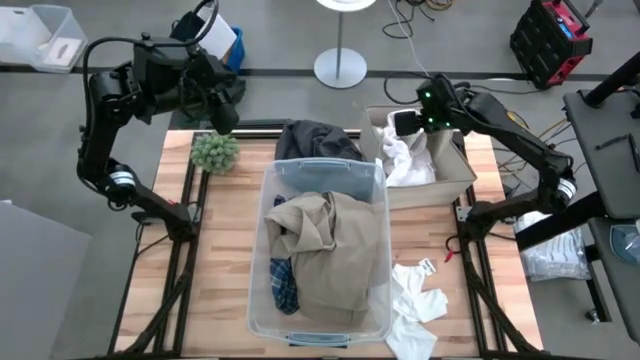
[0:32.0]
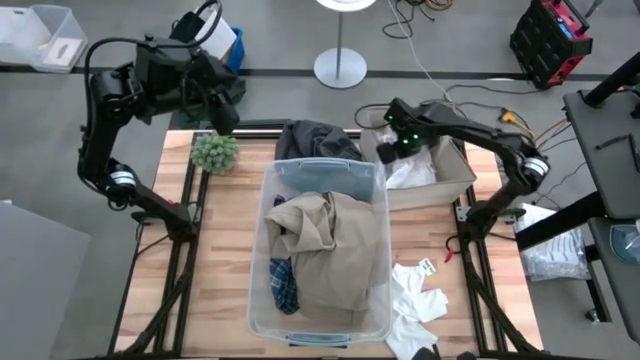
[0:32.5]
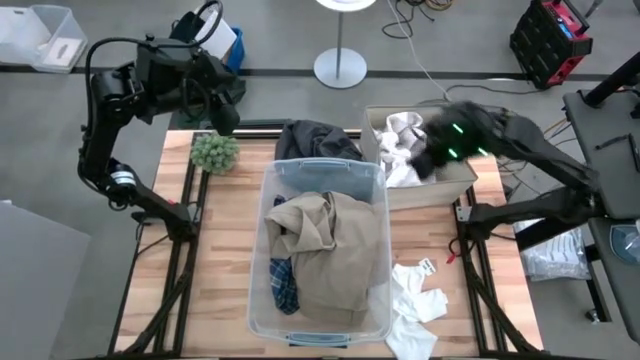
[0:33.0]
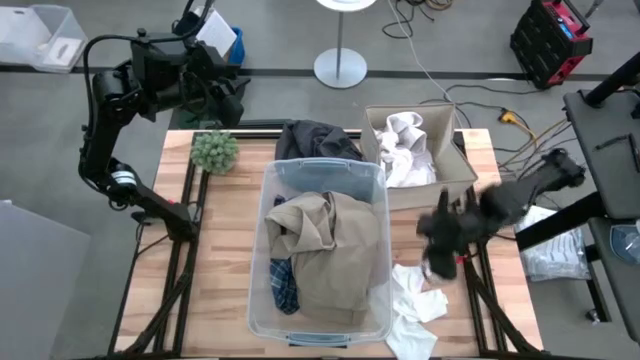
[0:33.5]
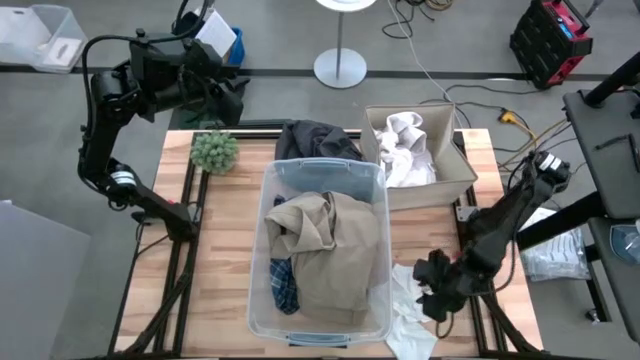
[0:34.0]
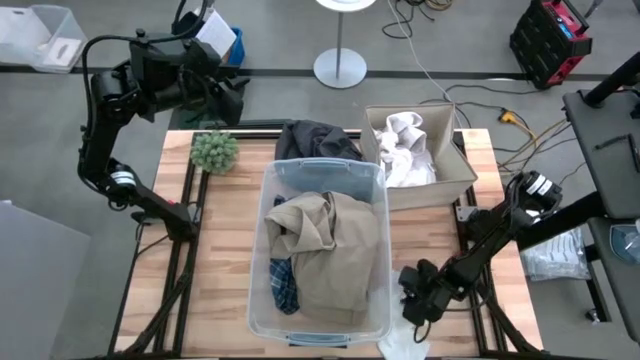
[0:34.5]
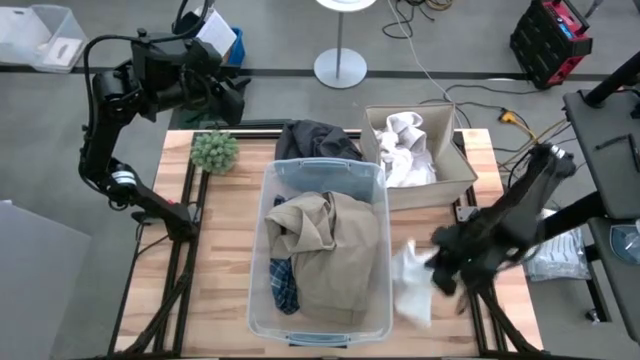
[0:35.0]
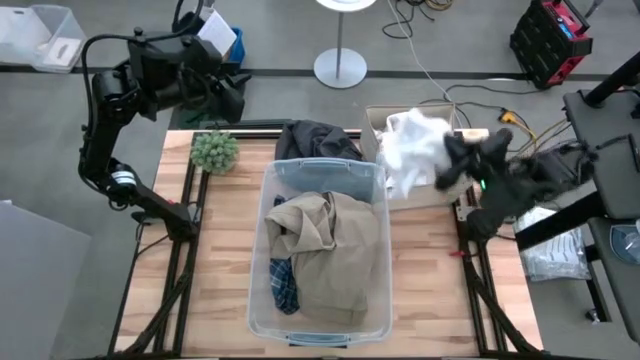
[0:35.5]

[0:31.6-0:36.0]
Task: Sort clothes
Put the white baby pajamas into the brown laundry organizer

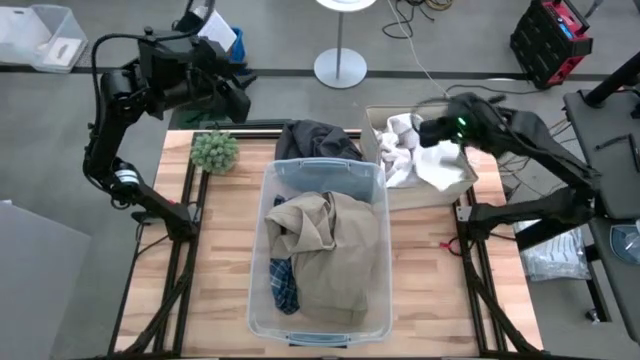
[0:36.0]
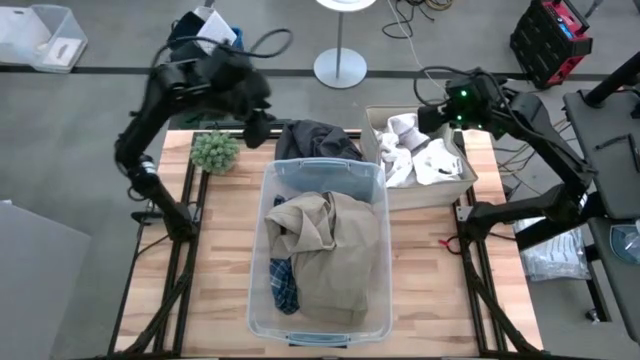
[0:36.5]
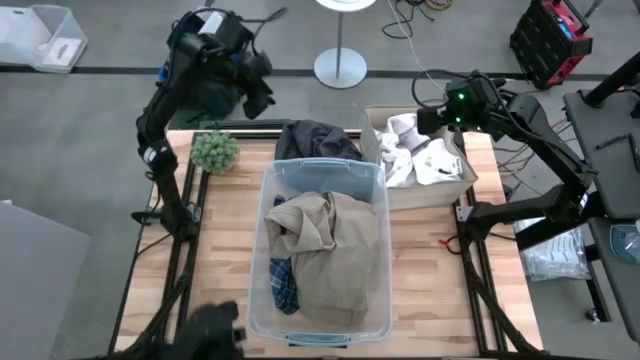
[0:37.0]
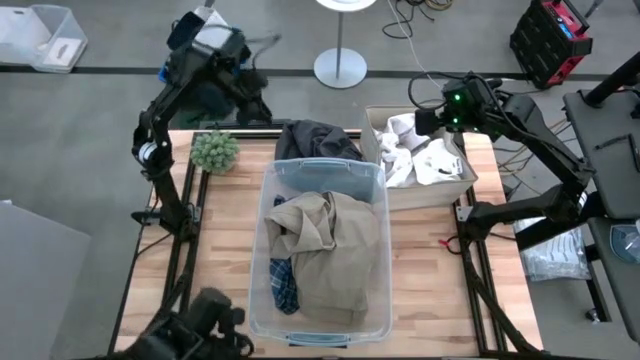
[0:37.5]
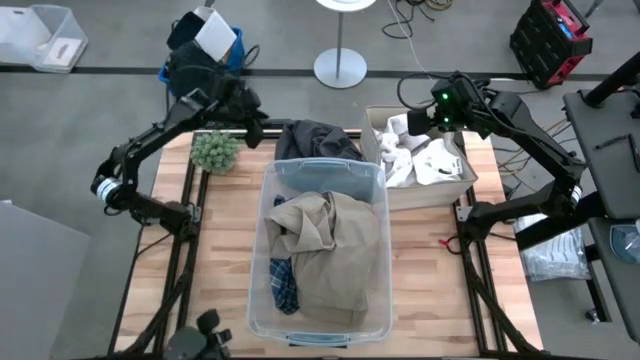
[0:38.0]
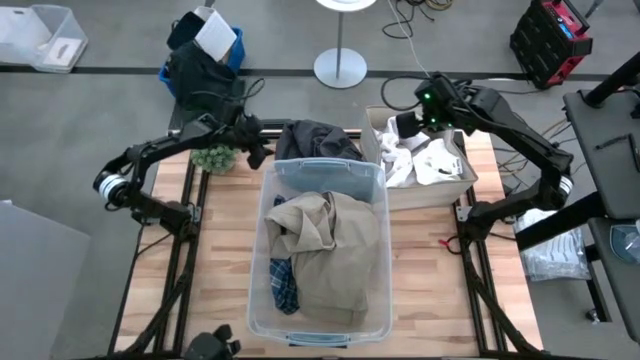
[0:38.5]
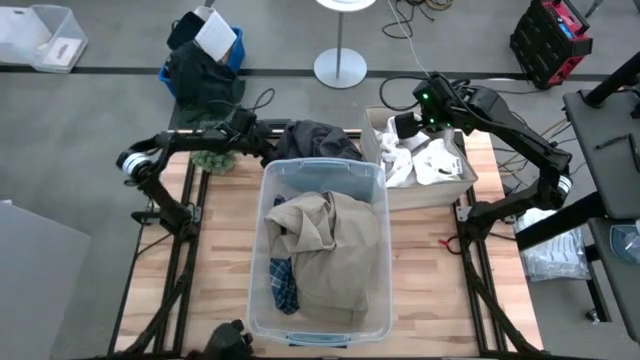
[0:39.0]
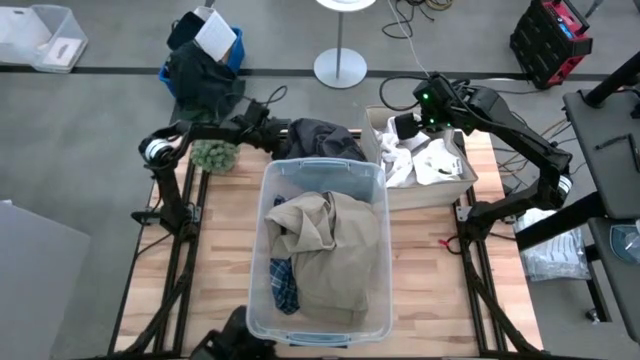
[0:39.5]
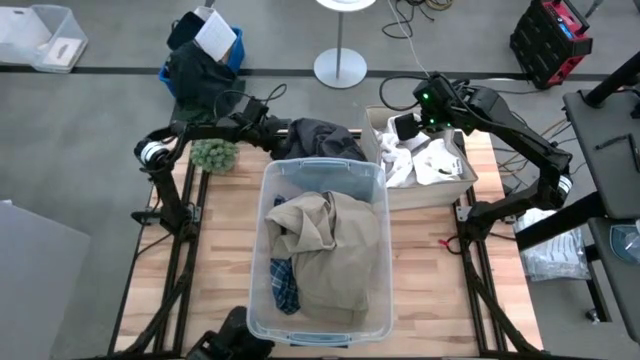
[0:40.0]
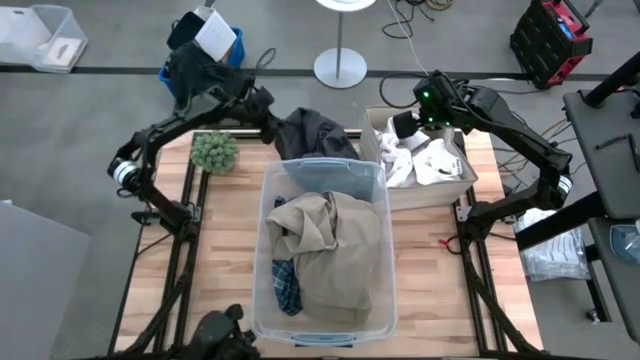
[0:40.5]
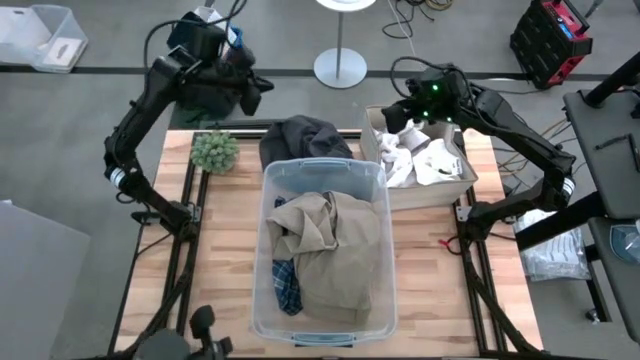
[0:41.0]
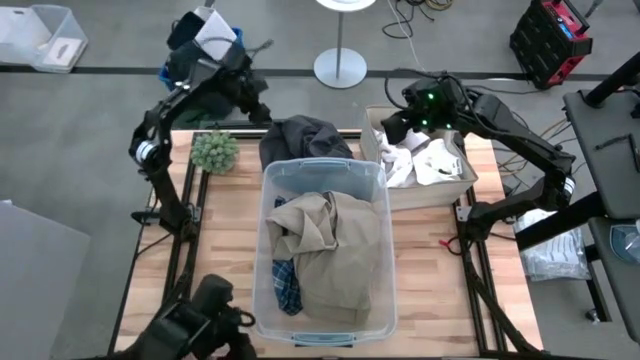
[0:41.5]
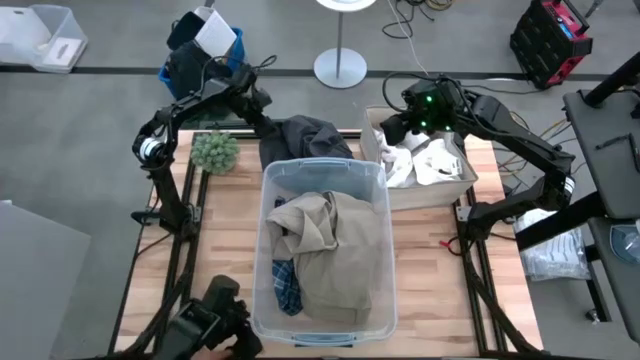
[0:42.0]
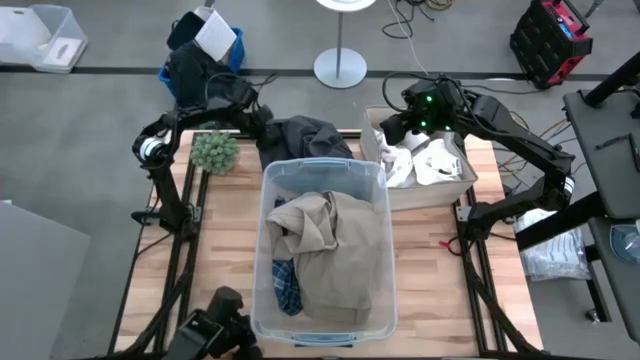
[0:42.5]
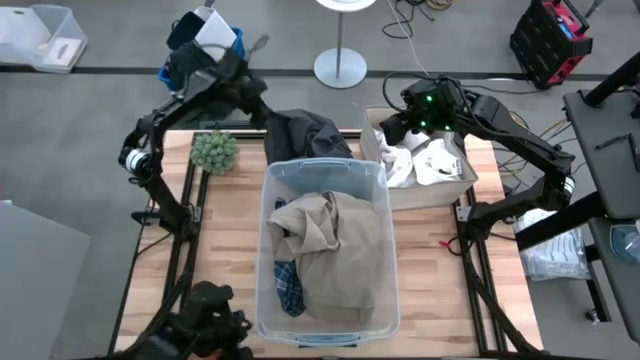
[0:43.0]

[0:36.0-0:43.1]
Put the black pants into the transparent bin

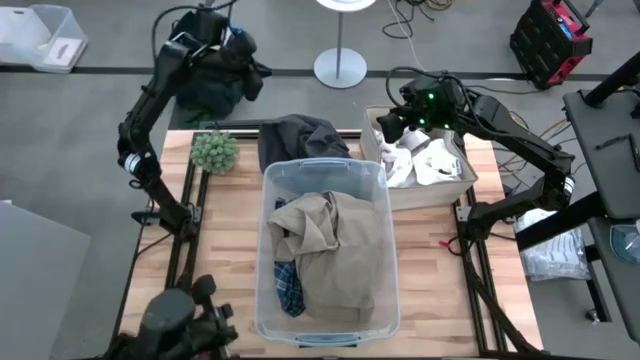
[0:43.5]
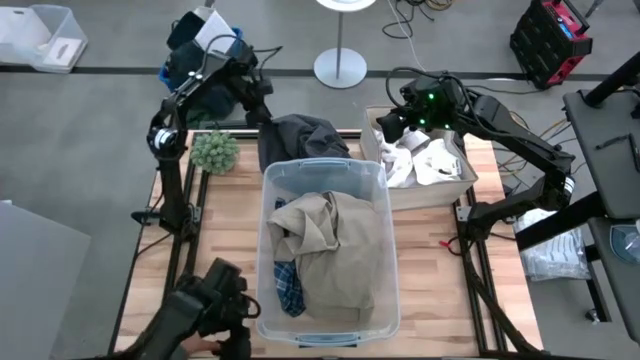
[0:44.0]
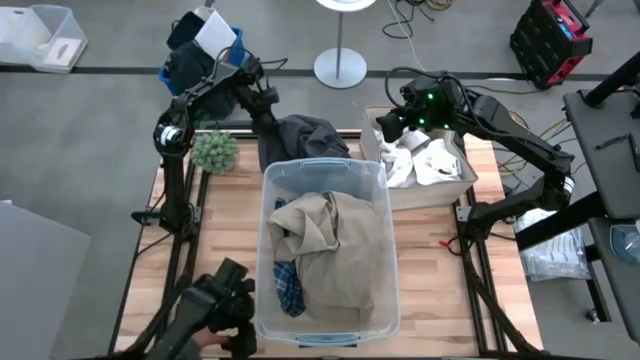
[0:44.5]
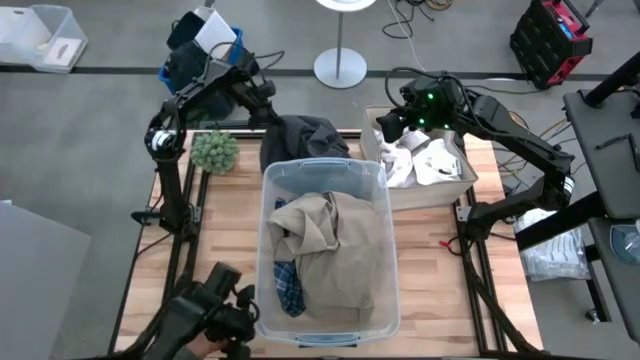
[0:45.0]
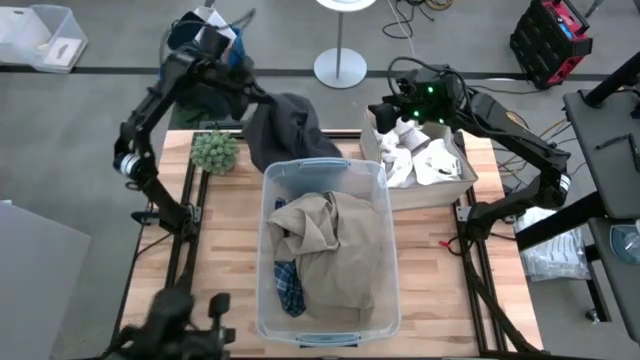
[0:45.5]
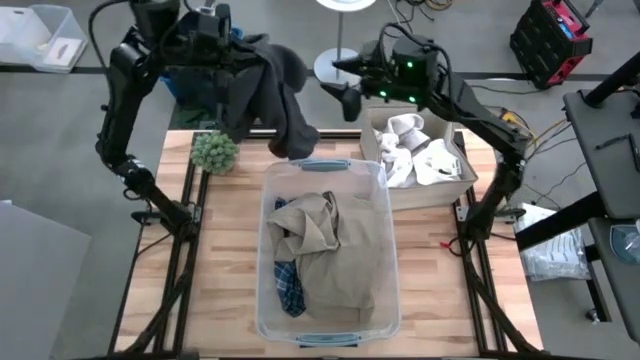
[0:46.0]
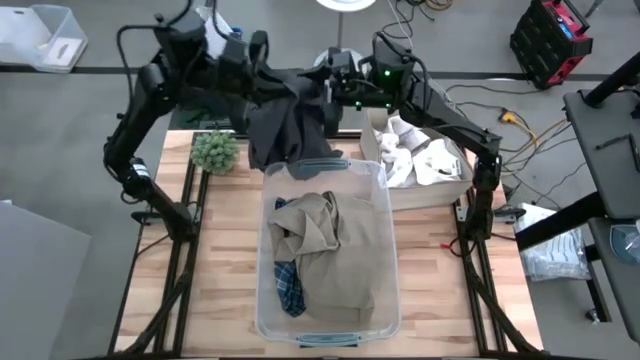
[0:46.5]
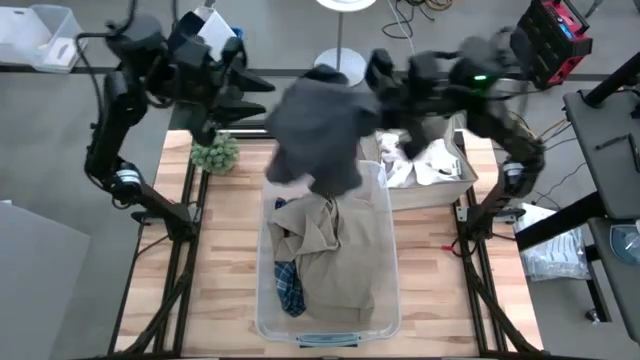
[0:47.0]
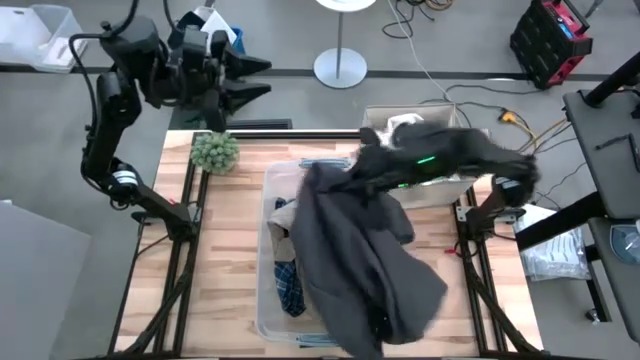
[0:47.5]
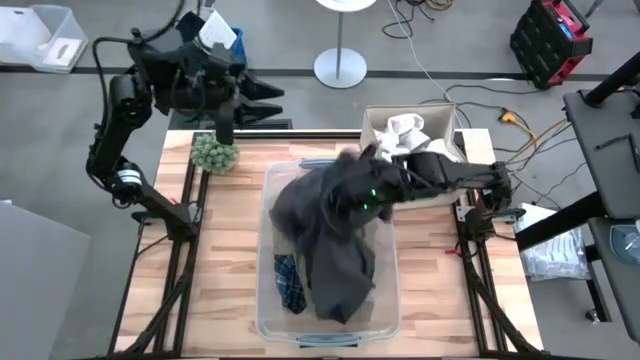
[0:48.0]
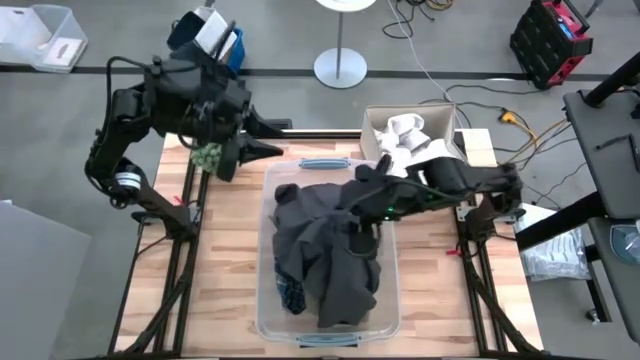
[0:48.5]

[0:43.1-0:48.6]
Put the black pants into the brown bin

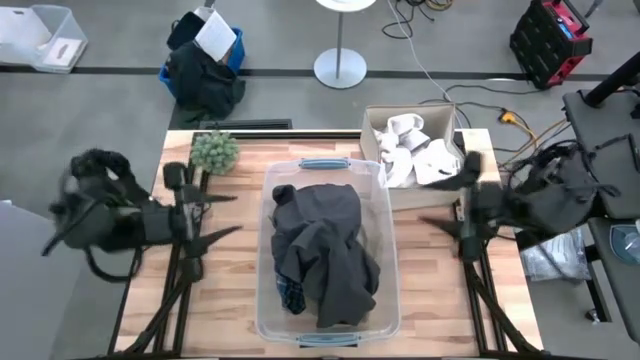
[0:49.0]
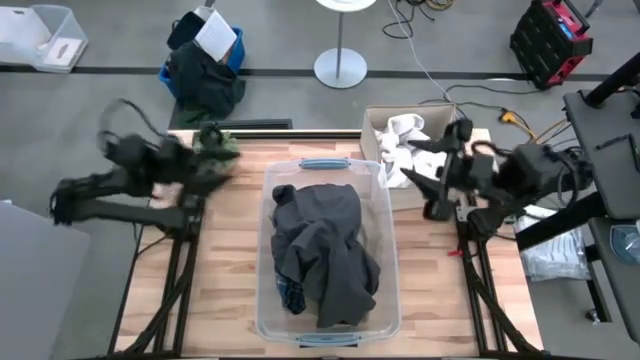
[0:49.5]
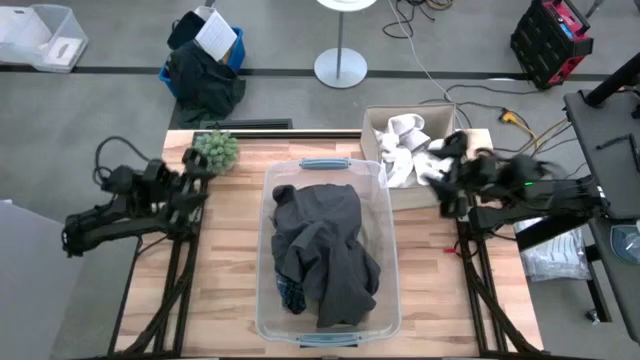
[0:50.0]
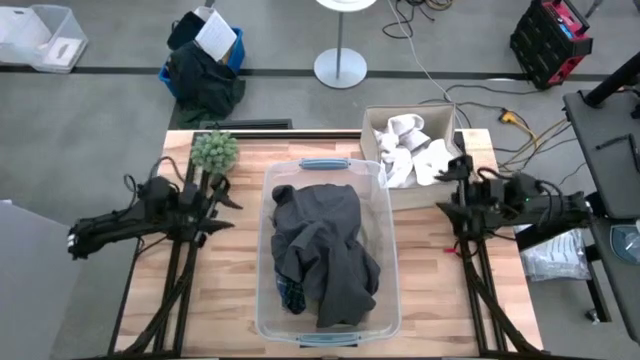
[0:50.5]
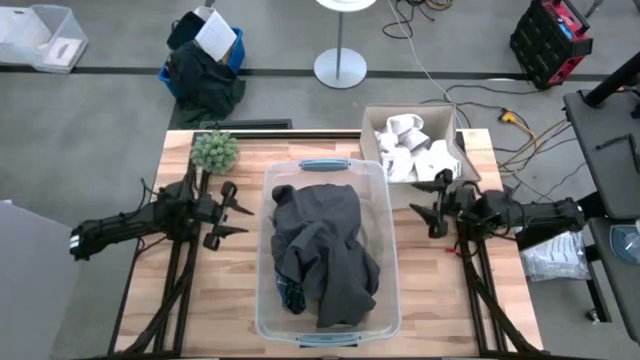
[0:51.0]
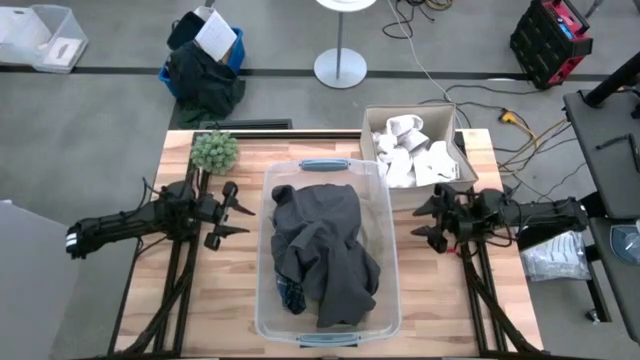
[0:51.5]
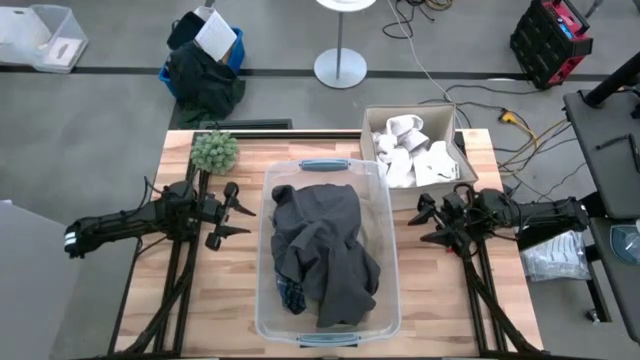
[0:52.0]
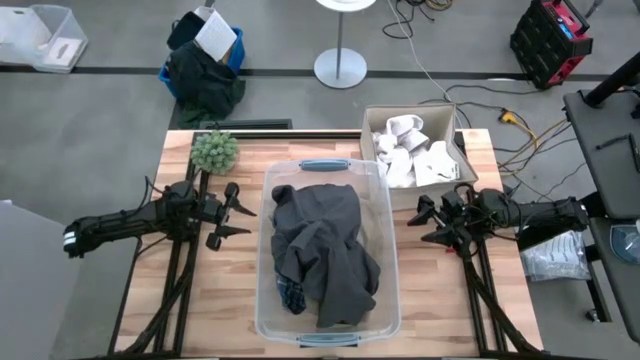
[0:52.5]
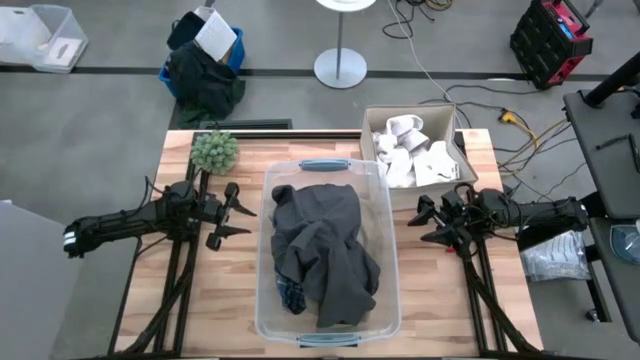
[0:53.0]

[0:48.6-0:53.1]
Return to Home Position

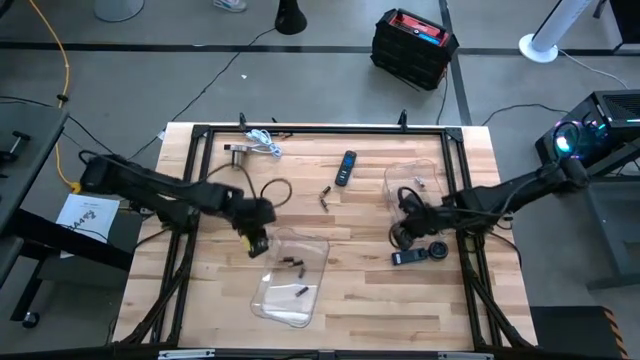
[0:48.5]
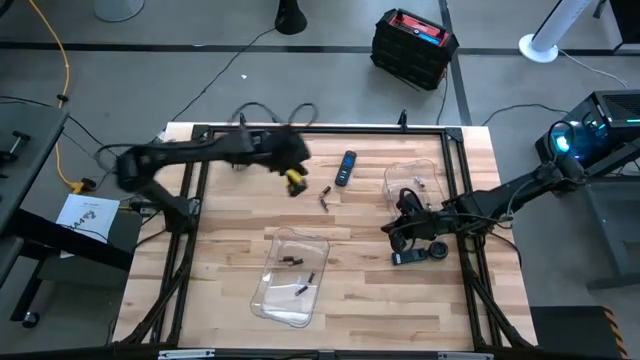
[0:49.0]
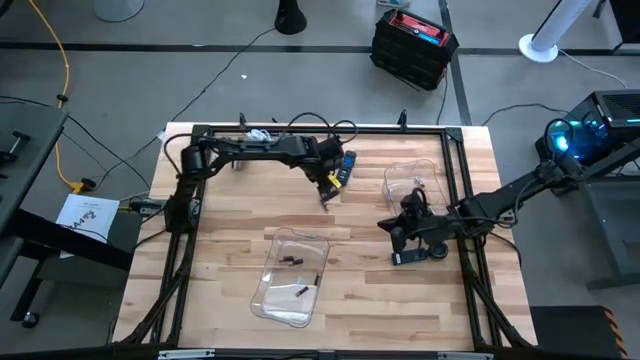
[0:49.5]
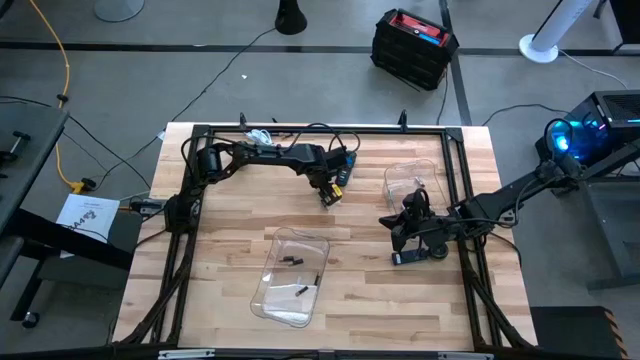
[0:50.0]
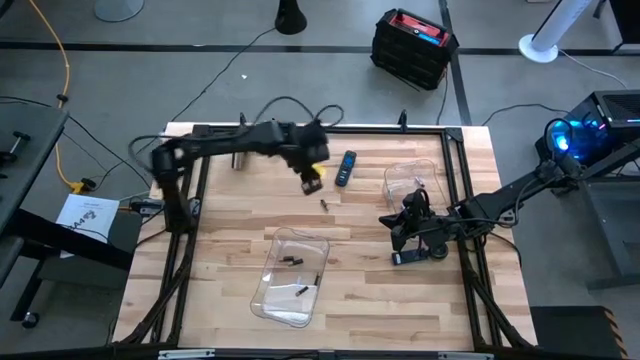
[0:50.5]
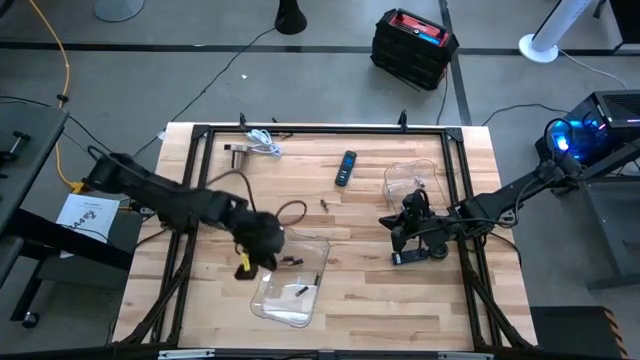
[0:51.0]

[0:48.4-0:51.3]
Task: Sort batteries
Put the black battery into the left transparent bin
